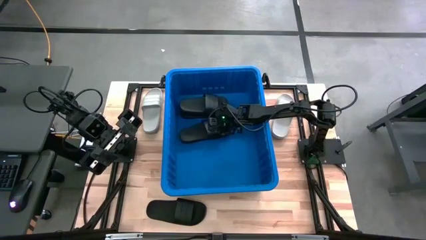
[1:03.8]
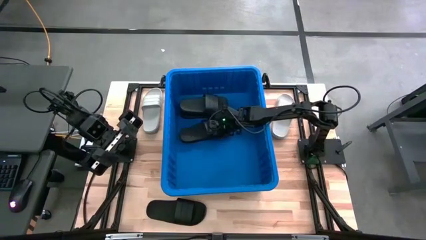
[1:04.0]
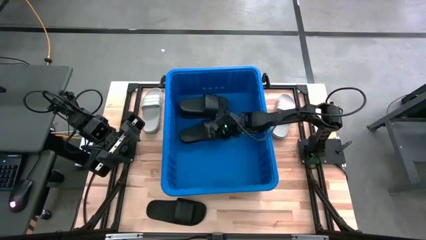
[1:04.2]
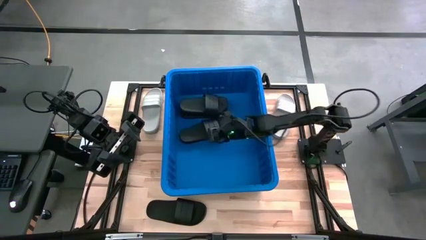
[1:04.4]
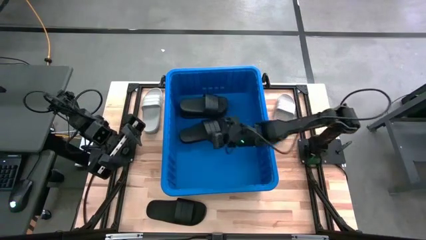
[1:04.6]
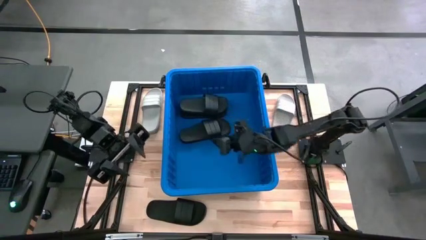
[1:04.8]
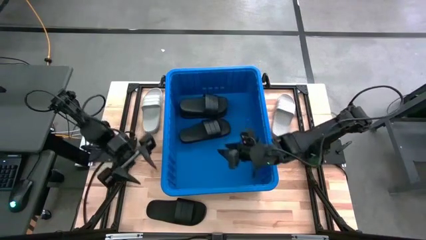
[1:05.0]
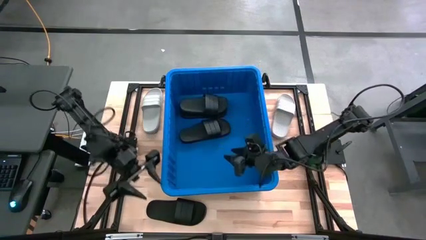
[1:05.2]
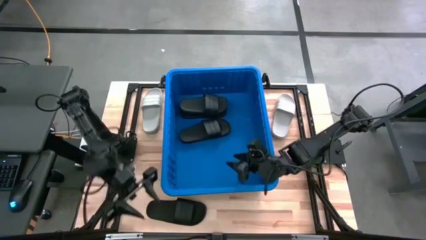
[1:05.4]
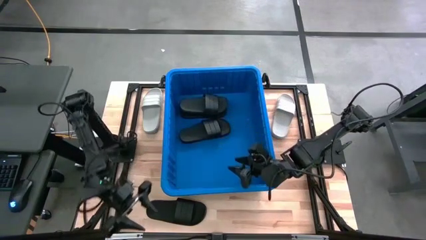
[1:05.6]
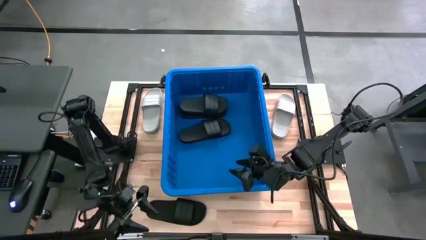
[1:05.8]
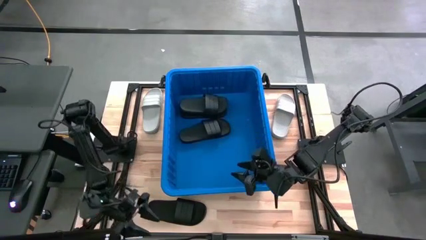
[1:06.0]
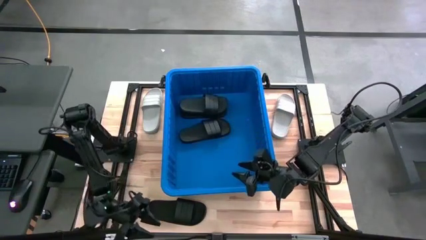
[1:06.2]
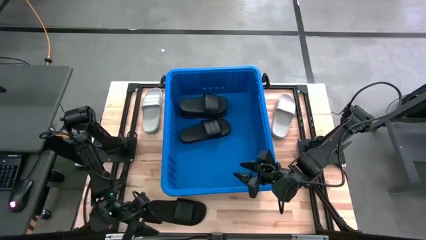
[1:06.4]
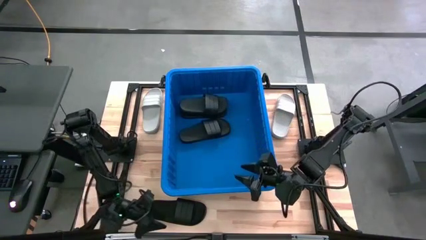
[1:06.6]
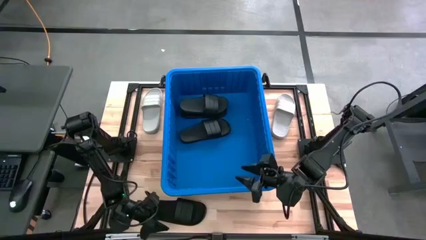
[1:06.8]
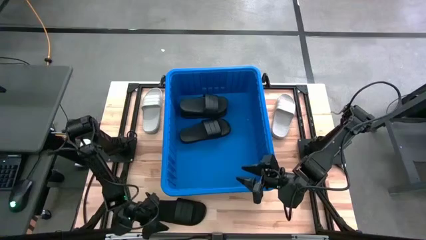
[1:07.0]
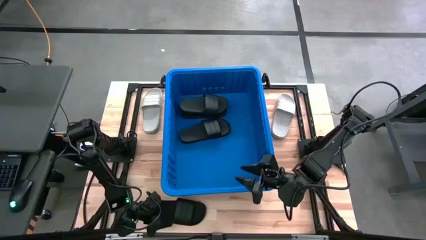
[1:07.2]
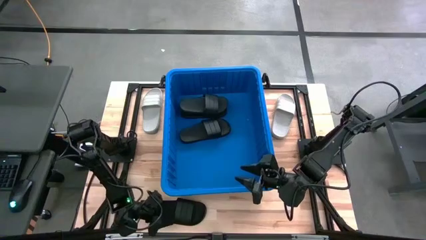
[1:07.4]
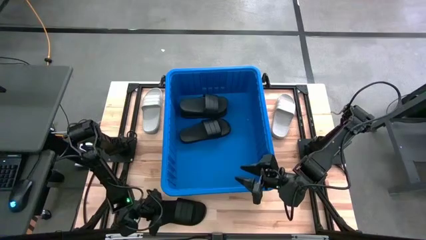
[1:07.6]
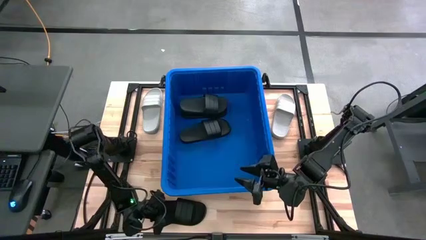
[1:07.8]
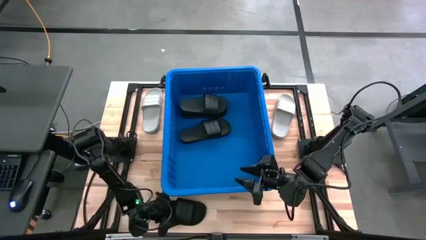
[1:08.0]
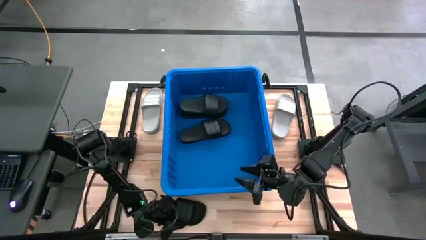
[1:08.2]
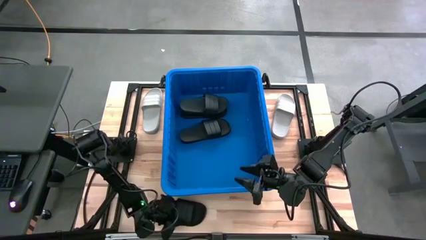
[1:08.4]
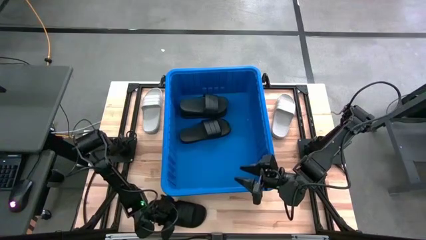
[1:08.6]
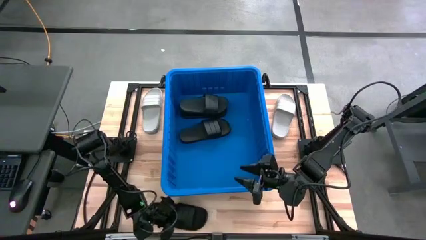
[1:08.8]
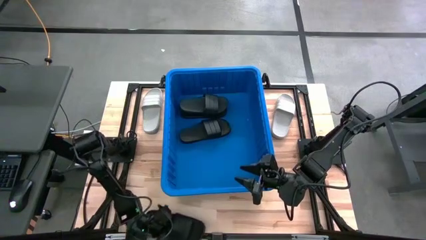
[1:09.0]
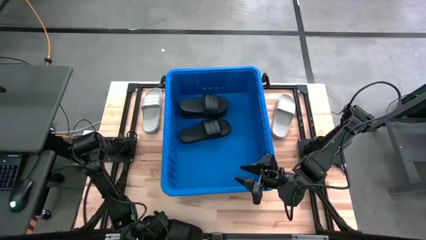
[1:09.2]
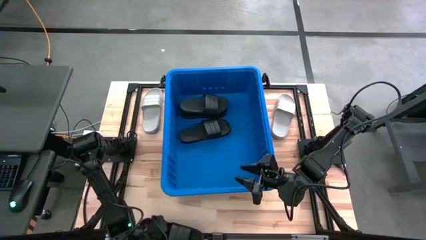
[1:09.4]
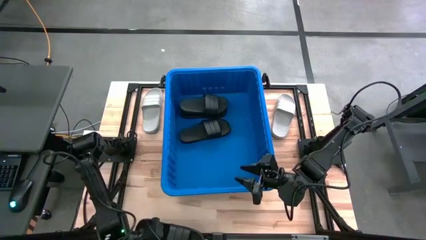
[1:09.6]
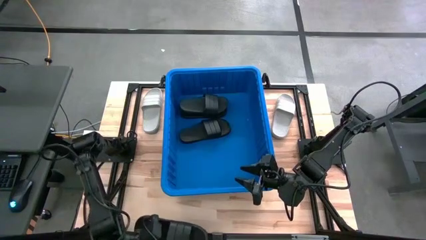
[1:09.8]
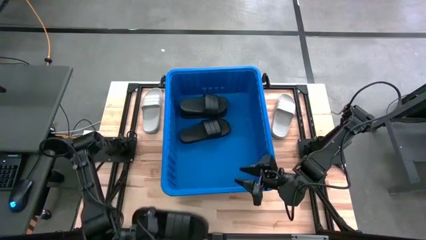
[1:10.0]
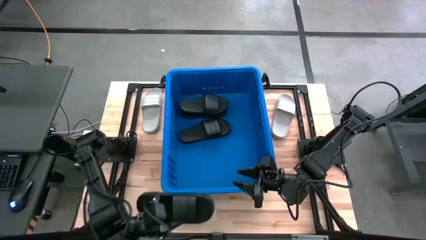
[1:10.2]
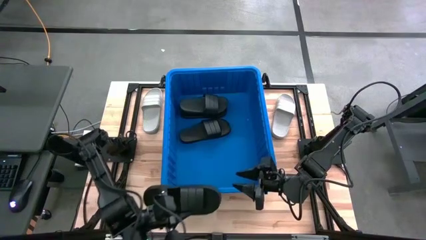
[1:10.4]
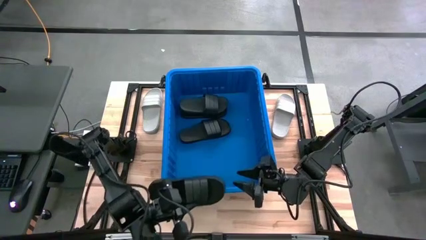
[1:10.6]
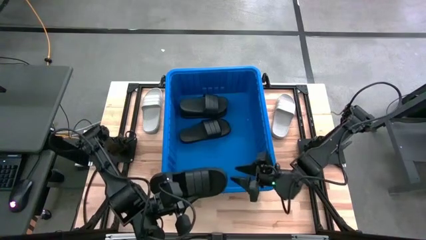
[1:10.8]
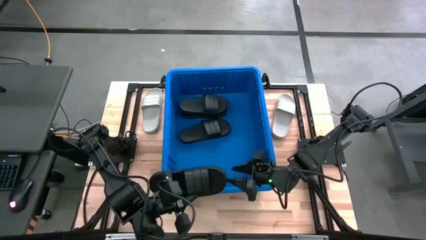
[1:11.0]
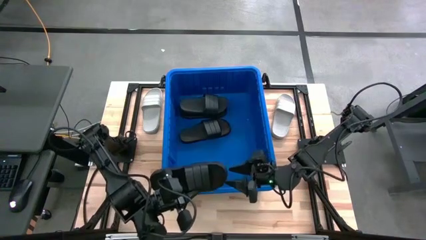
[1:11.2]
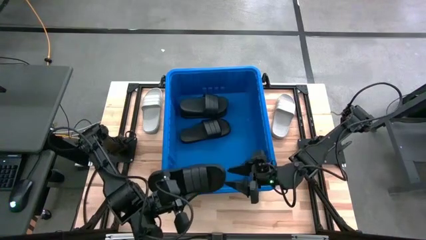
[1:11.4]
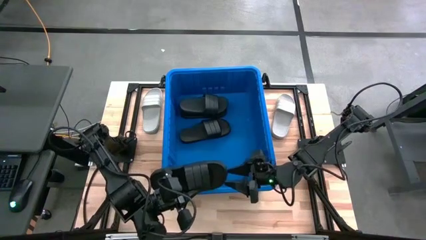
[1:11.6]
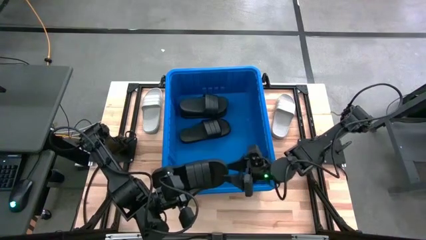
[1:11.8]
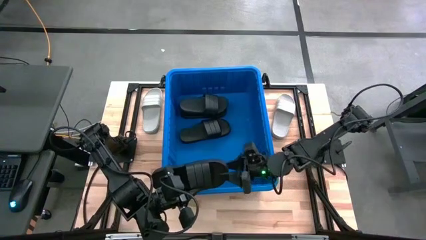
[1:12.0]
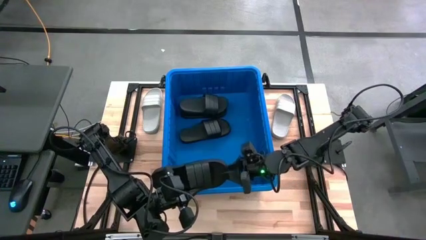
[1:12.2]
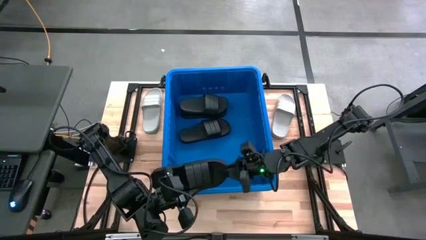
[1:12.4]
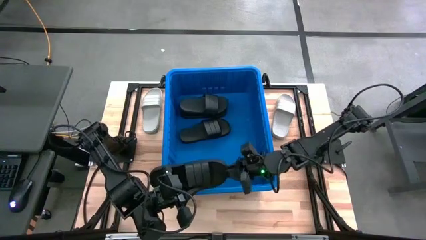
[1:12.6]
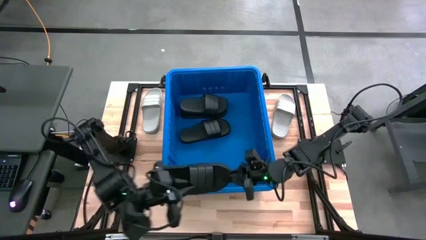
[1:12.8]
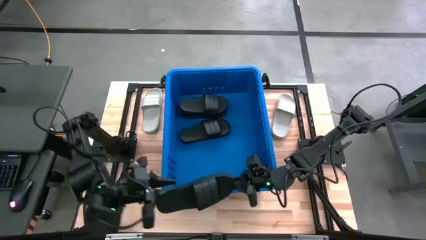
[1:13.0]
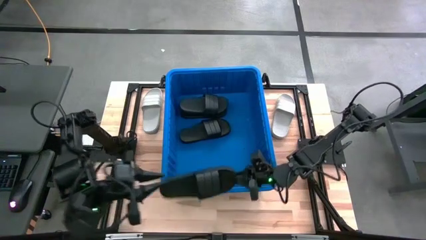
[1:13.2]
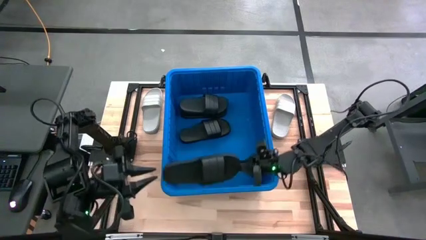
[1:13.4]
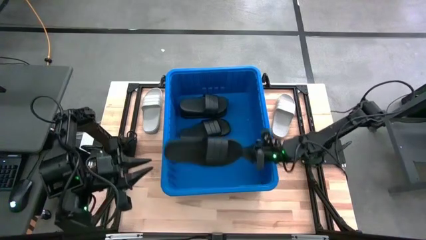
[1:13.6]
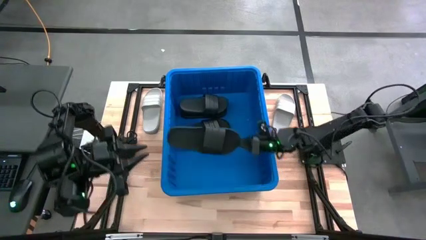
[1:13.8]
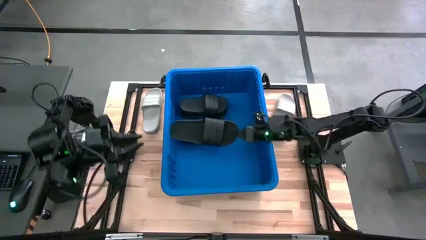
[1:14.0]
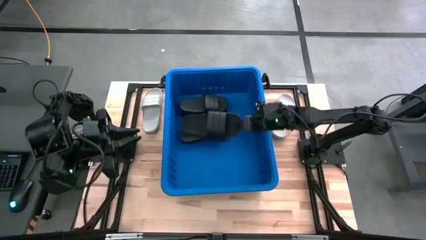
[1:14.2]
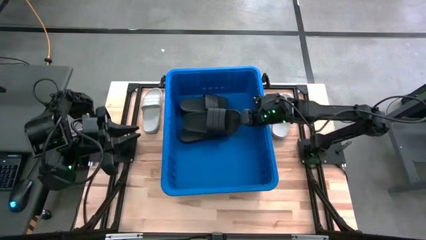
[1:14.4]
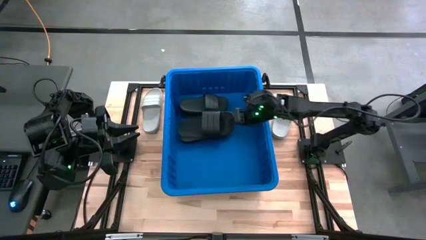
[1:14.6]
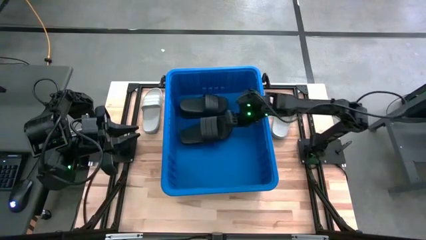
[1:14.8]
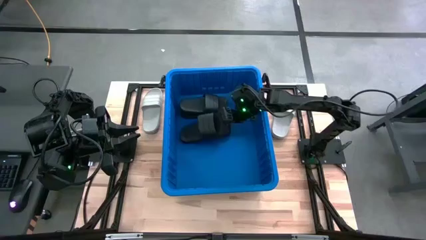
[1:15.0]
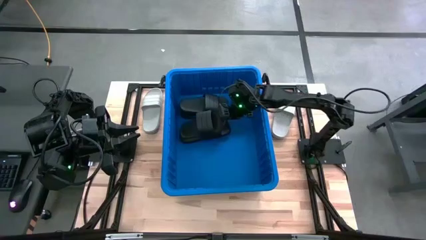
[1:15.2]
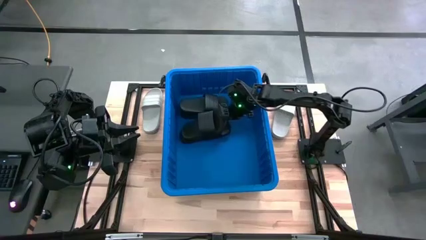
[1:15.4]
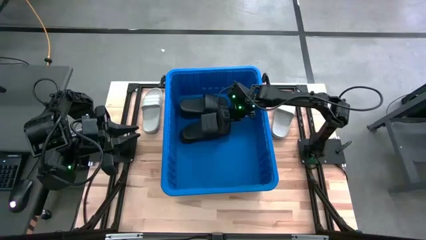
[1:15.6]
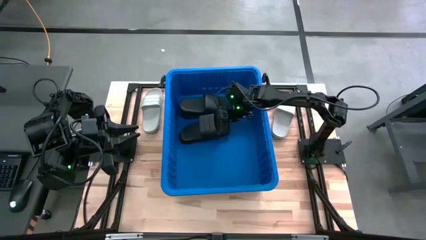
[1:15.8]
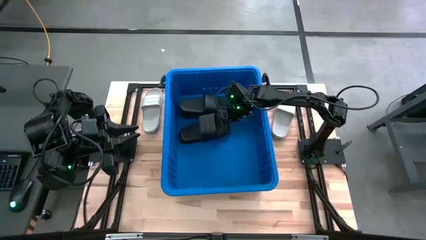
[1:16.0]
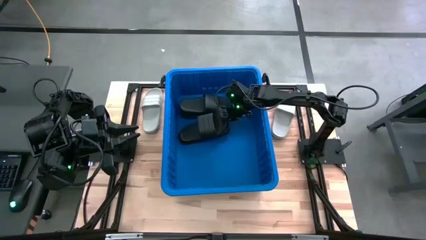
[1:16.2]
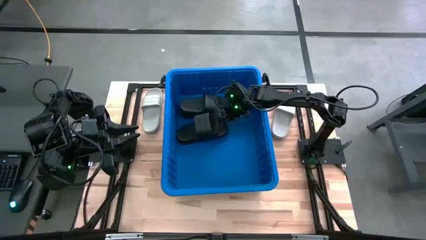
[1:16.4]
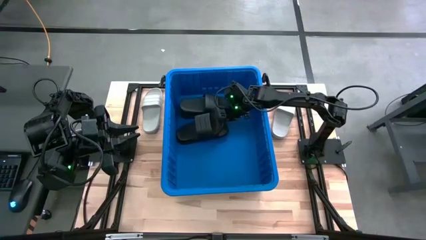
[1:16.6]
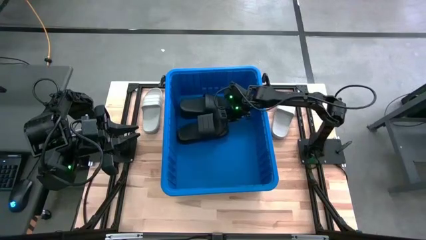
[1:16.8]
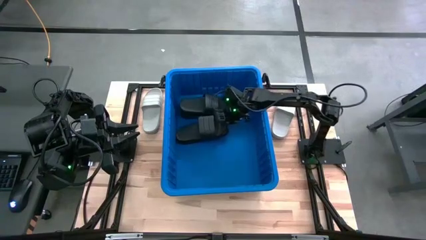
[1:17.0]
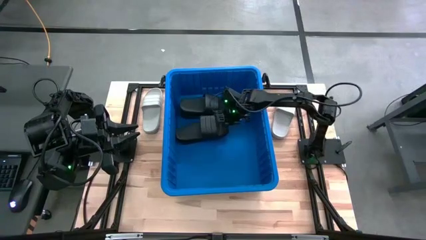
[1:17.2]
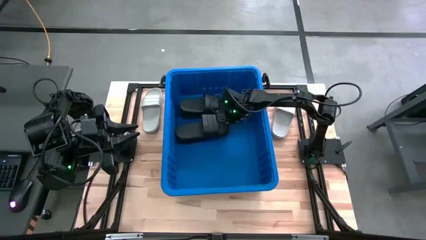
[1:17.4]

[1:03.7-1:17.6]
Task: Pick and place slides into bin
Put the black slipper into the bin

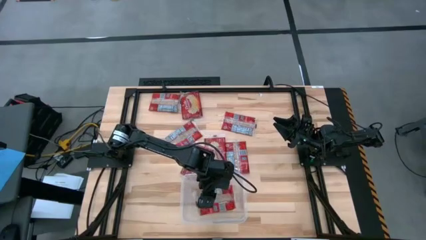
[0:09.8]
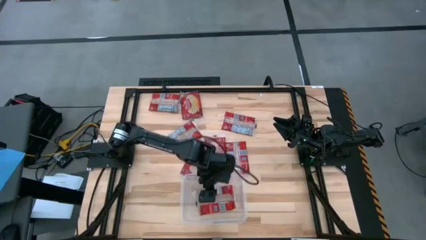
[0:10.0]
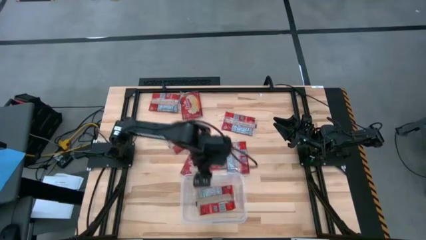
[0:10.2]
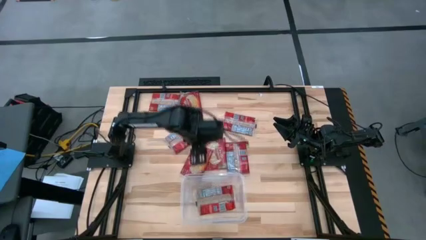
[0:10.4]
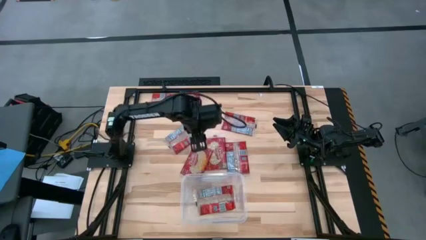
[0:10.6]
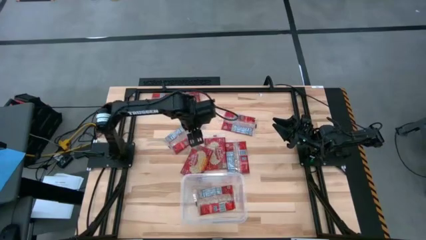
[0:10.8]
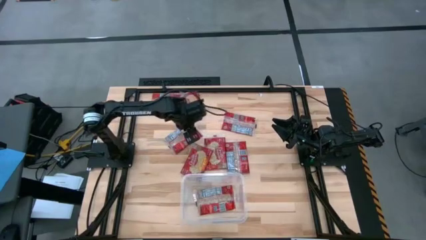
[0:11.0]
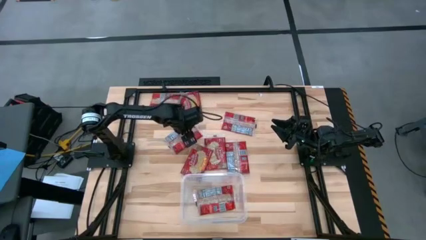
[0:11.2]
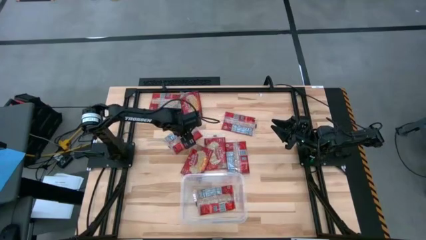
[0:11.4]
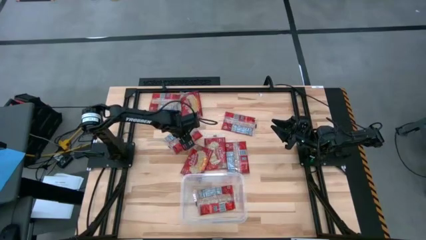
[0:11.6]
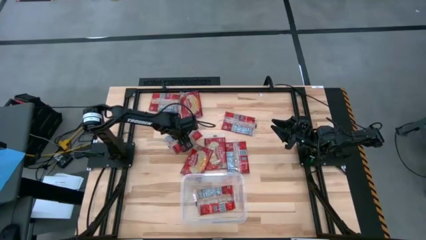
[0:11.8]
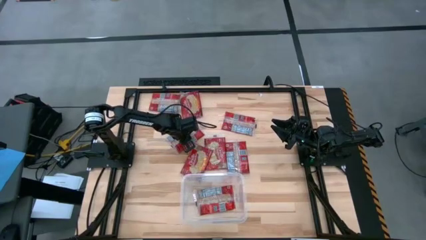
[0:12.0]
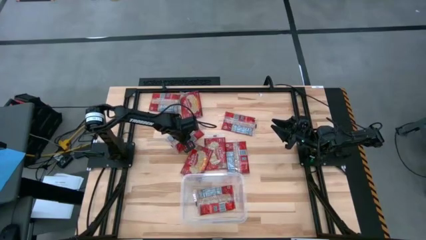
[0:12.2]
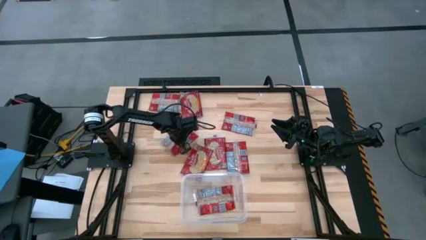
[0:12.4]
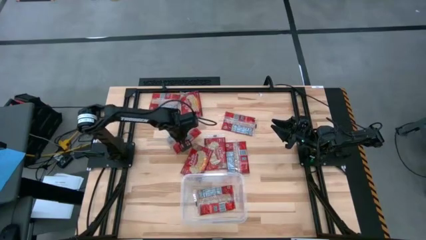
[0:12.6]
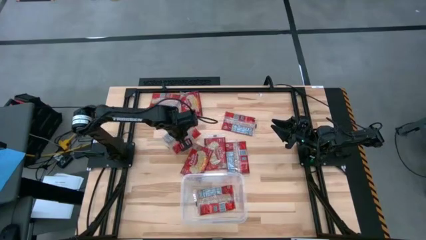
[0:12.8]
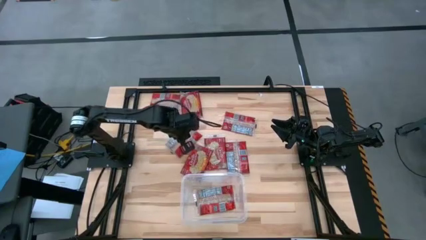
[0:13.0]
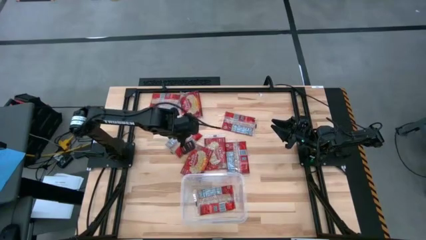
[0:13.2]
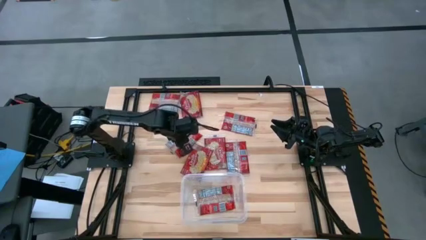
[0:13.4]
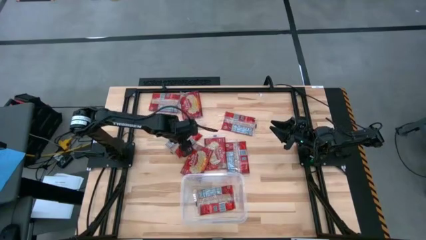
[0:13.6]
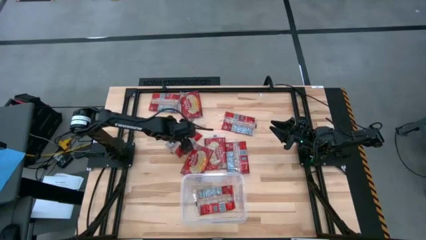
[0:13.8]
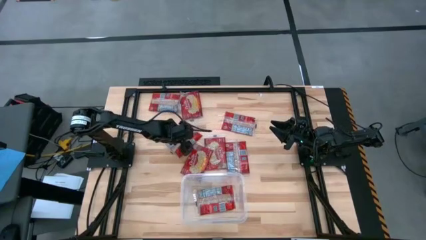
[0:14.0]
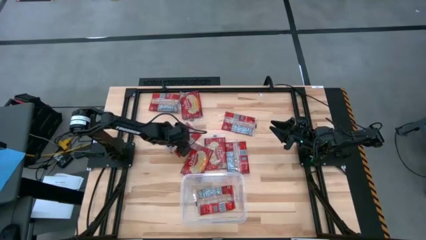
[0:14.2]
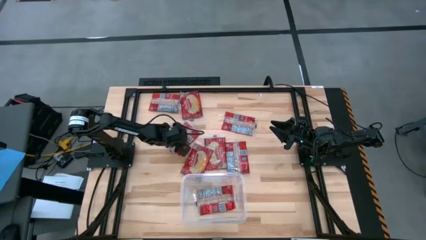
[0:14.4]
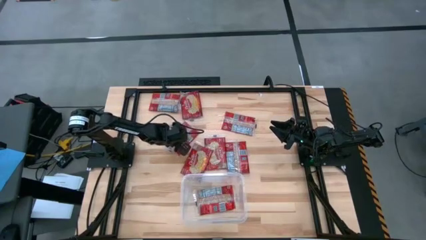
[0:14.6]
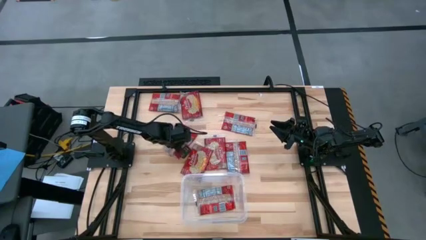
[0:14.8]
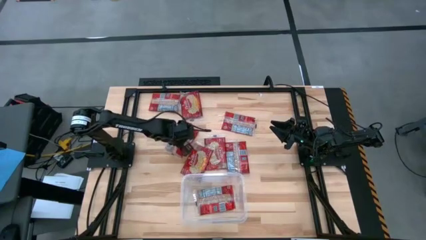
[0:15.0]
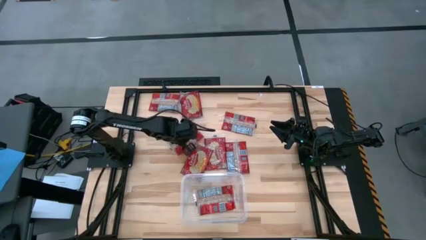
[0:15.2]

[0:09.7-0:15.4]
Task: Sort popcorn bags into baskets
Put the red popcorn bag into the transparent container
